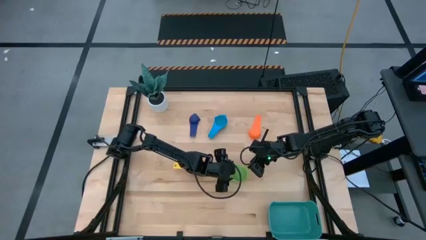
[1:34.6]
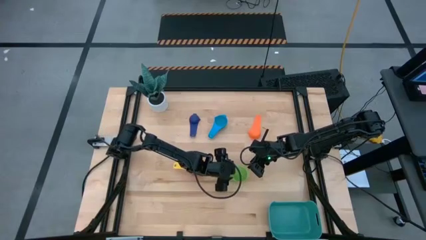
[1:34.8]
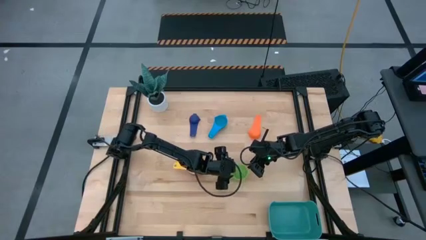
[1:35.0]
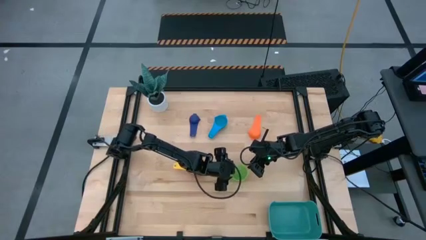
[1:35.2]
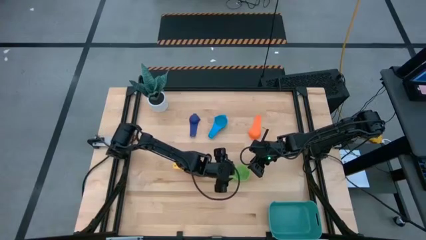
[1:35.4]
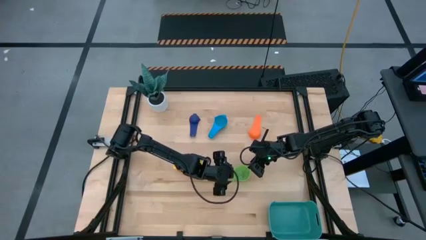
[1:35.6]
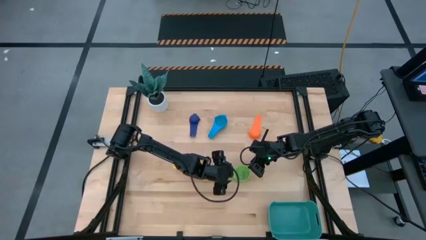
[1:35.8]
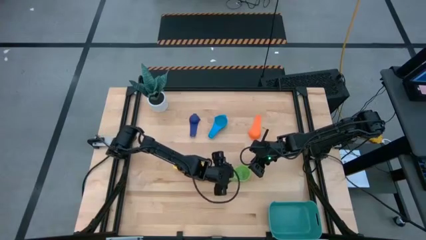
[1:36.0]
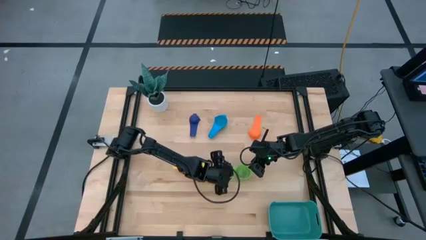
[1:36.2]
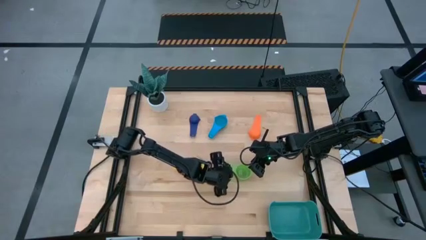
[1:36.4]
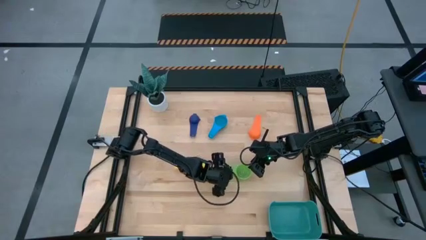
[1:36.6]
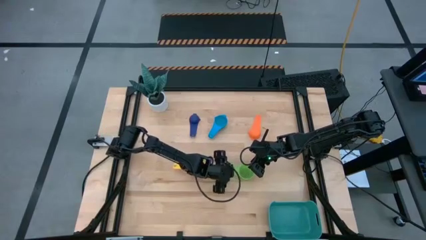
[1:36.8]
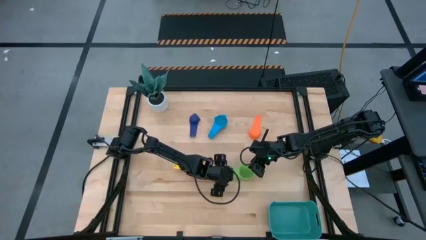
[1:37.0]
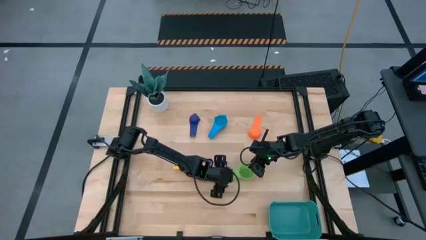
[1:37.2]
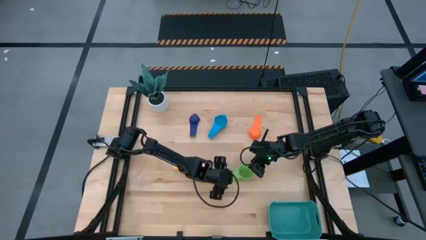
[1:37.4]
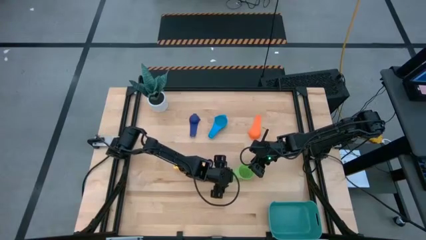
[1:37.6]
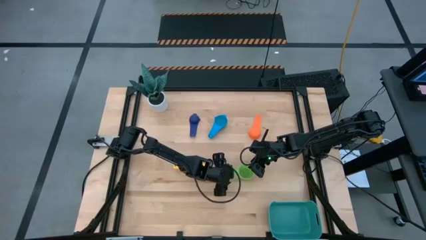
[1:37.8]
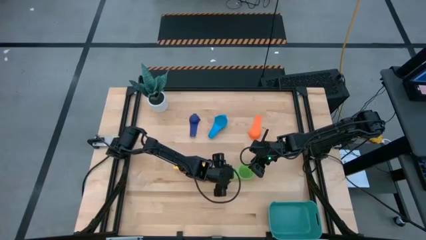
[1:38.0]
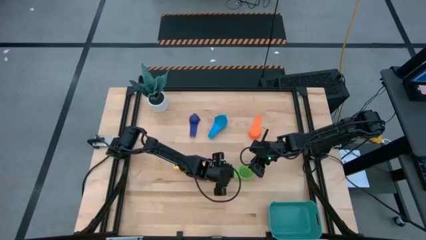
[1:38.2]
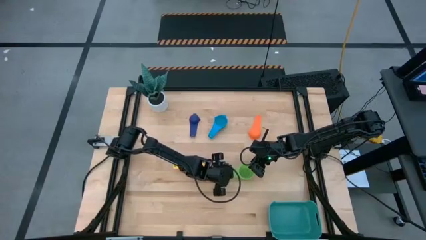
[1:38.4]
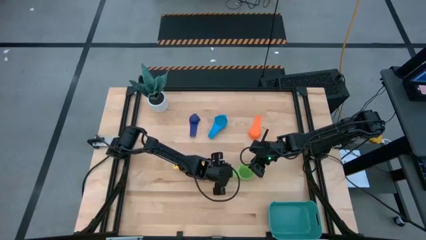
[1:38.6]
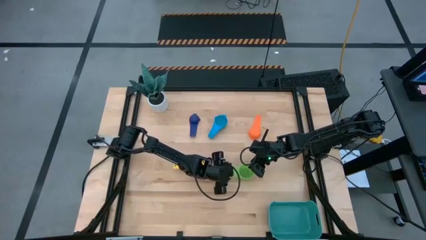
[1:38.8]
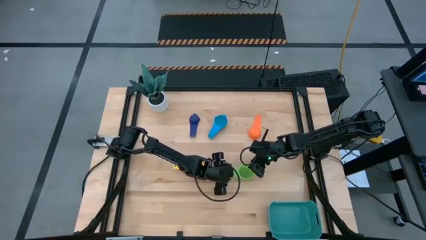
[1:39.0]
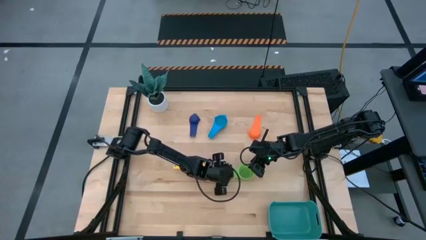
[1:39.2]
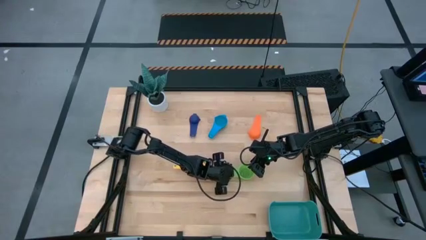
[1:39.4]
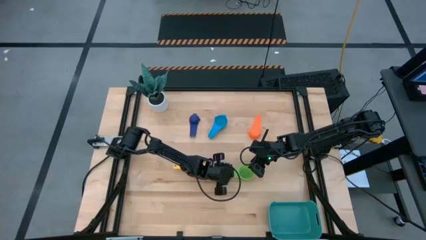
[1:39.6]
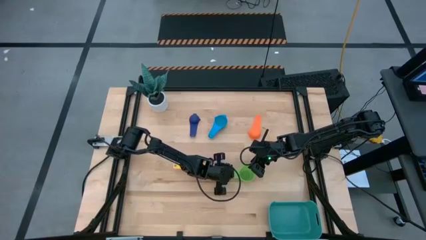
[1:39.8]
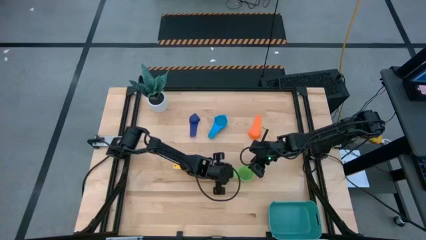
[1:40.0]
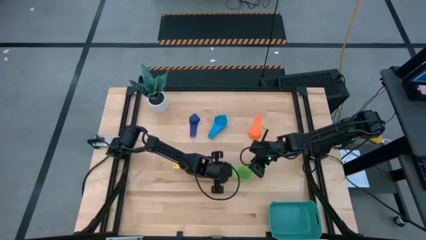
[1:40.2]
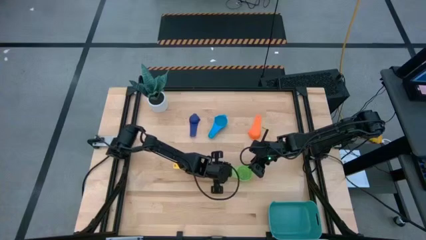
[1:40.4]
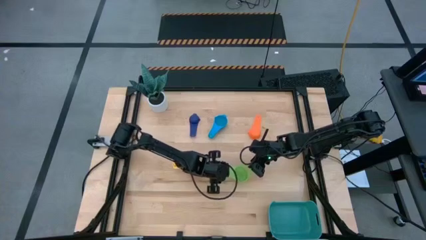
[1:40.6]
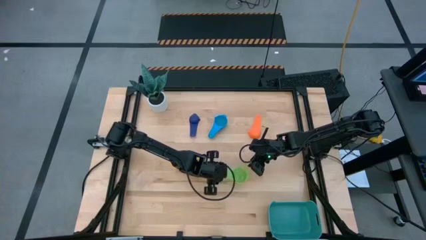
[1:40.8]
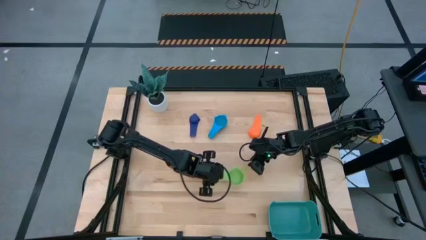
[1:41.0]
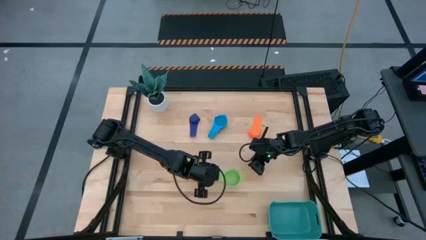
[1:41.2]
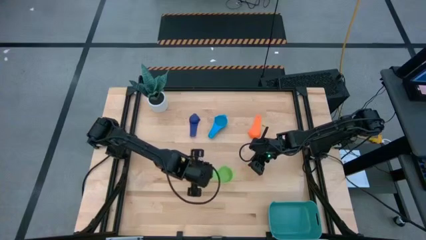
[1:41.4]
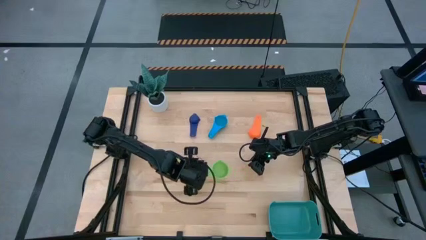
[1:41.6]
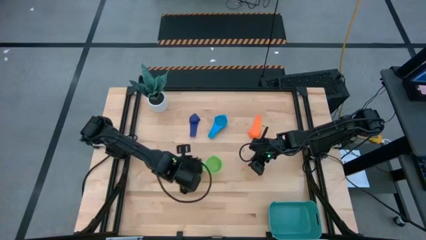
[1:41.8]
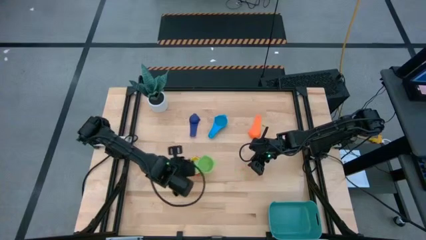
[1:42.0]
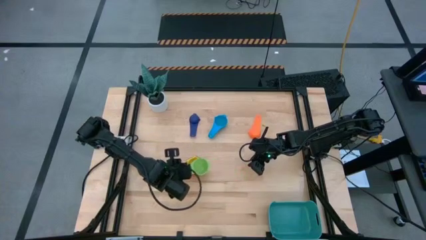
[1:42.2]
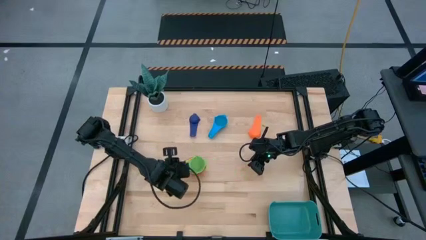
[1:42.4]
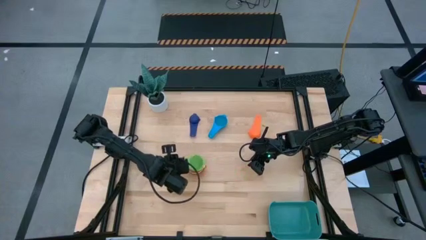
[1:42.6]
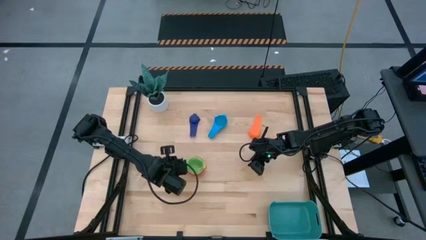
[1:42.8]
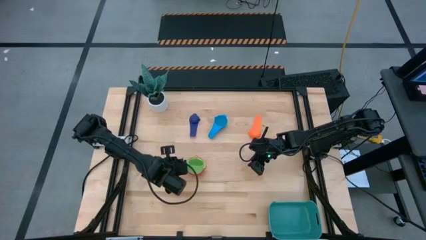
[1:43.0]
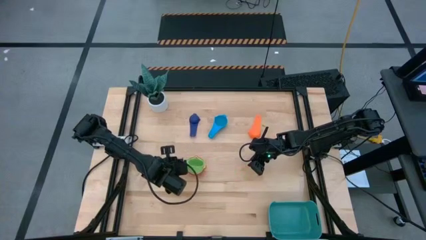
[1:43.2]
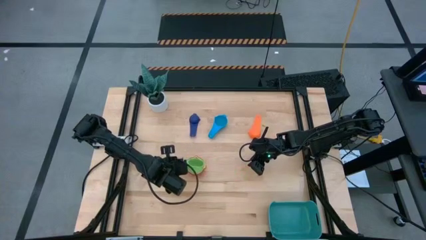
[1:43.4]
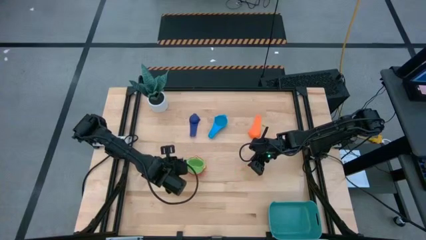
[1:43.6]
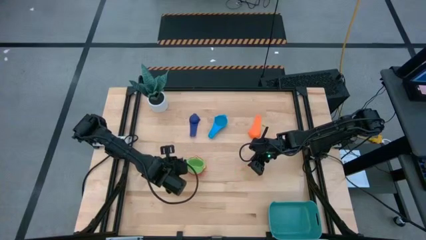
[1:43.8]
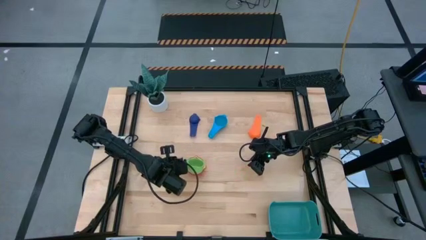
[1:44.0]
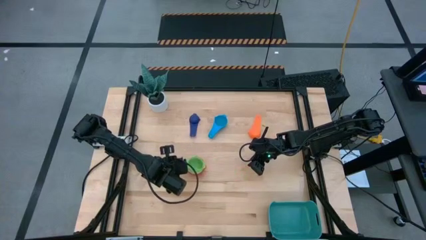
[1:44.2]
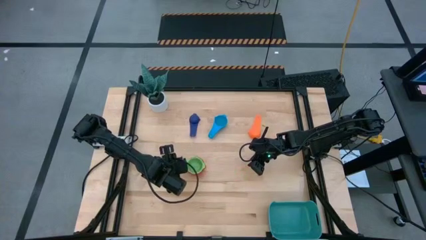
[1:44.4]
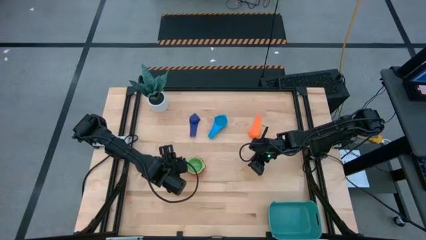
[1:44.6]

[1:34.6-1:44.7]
Task: Nest measuring cups in basket
Stack the green measuring cup on top of the yellow measuring cup

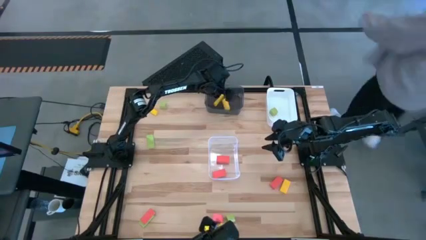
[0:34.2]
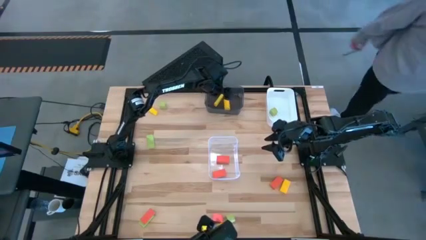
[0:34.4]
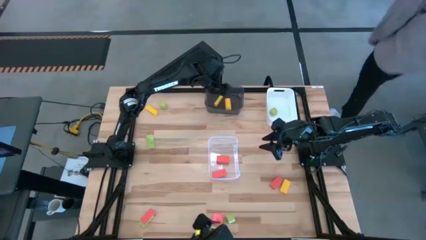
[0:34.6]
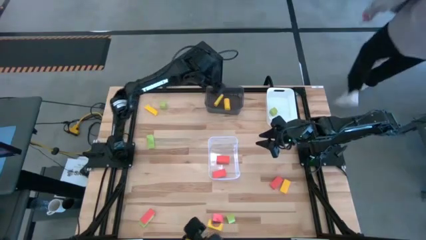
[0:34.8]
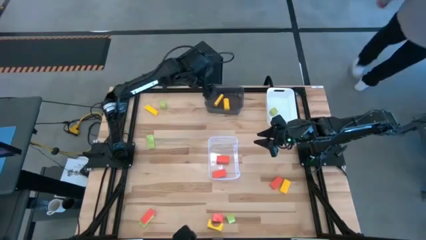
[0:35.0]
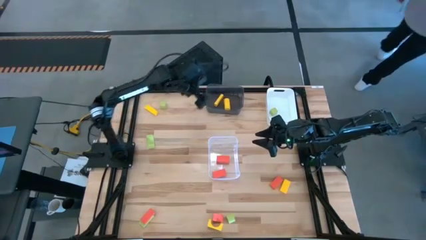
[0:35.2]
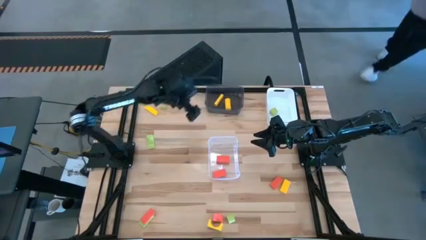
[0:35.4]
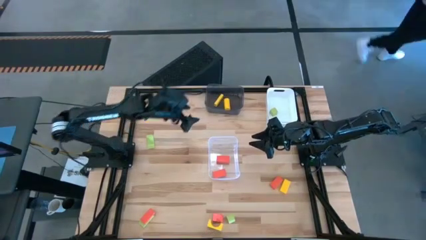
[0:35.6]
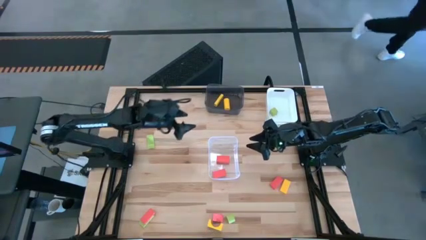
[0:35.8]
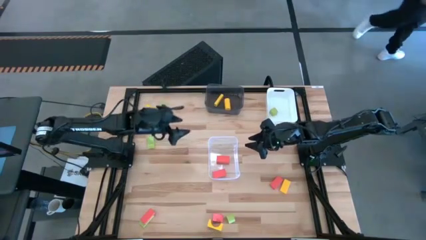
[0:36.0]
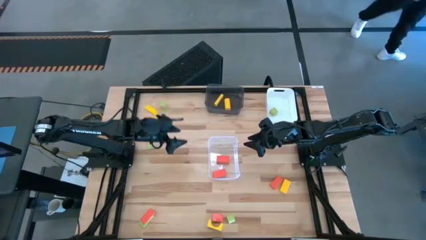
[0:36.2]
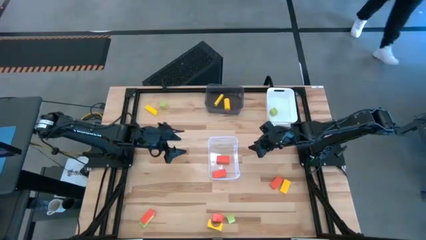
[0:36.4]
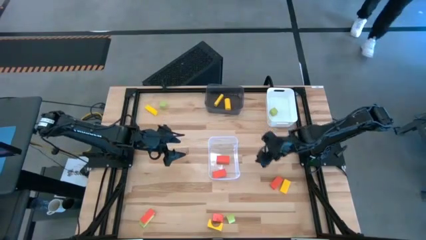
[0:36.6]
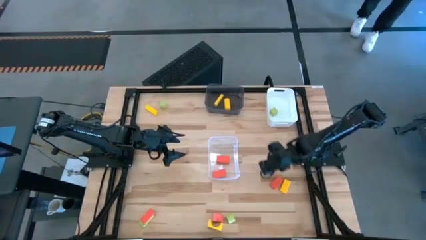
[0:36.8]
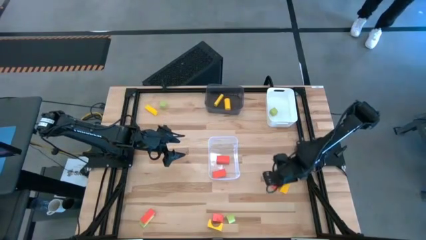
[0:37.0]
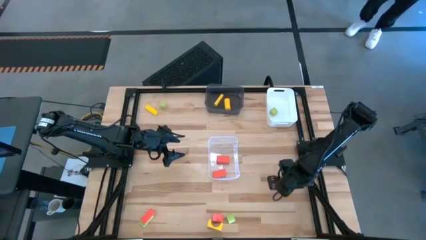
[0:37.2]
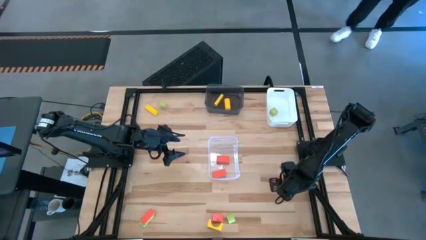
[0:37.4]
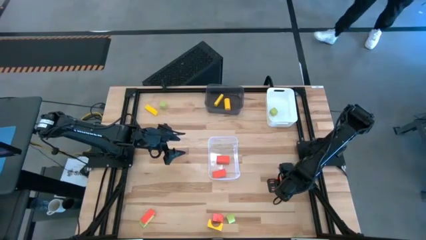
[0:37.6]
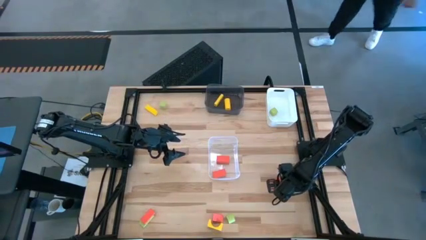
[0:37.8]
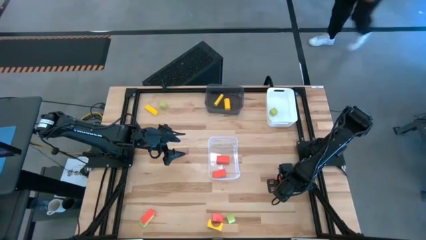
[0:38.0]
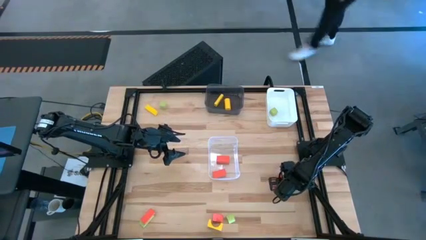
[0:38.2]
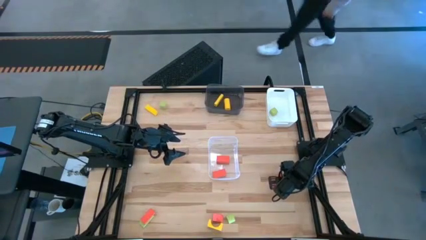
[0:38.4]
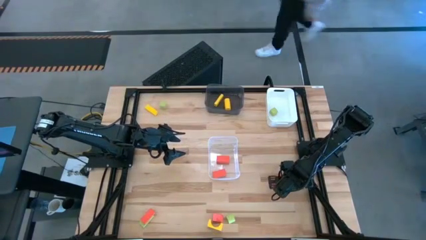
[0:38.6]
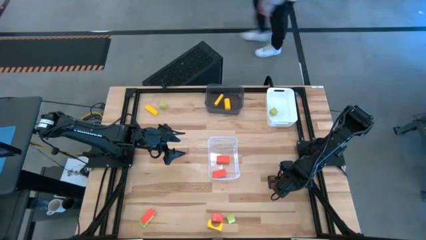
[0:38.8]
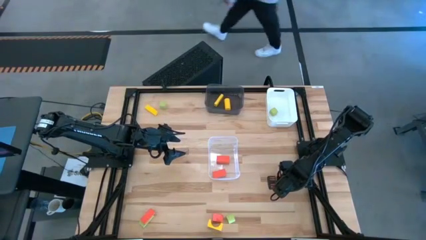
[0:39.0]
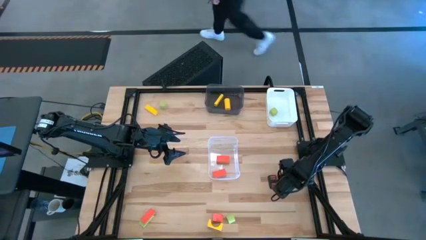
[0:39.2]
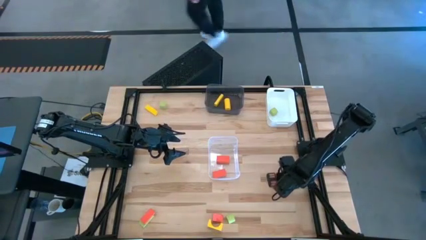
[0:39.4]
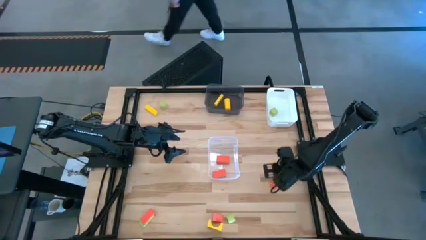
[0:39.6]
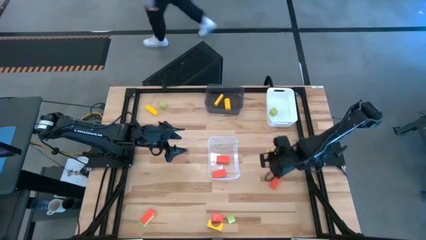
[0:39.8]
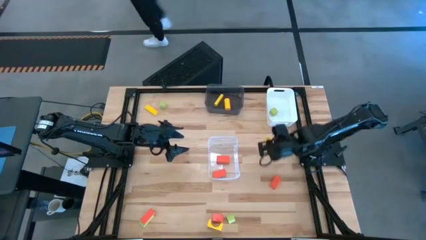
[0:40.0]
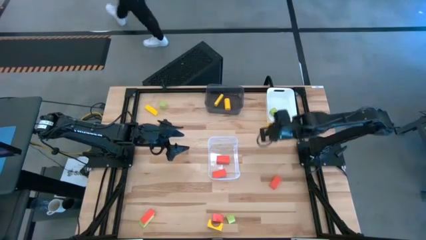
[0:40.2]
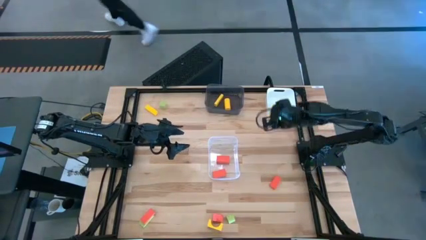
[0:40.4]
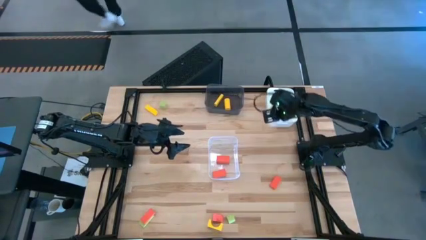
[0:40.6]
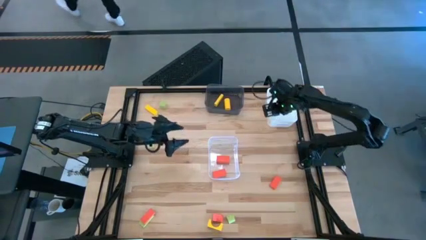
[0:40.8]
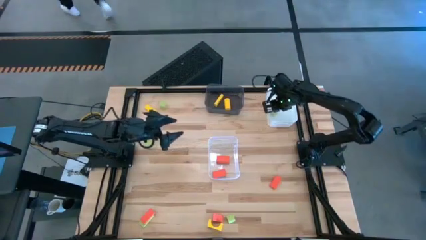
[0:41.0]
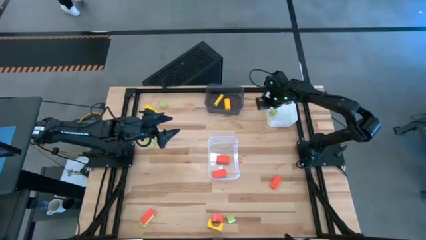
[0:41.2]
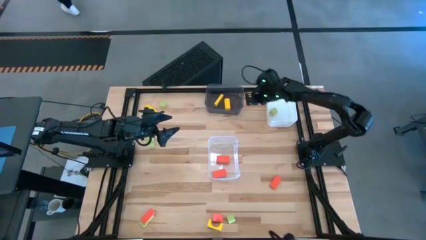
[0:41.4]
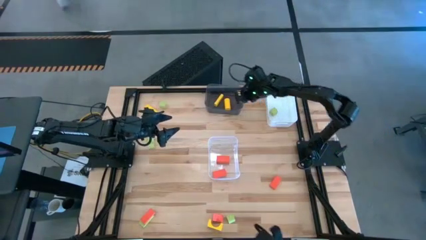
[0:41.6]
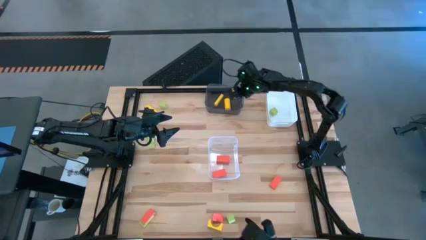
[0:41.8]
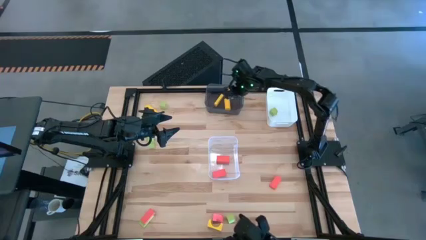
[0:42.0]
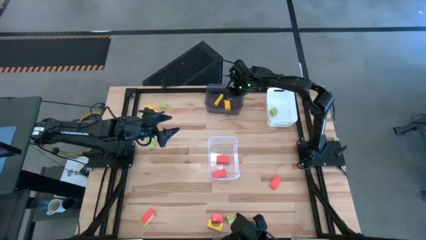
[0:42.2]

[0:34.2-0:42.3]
Task: Sort & place blocks by color
Put the yellow block into the black bin
